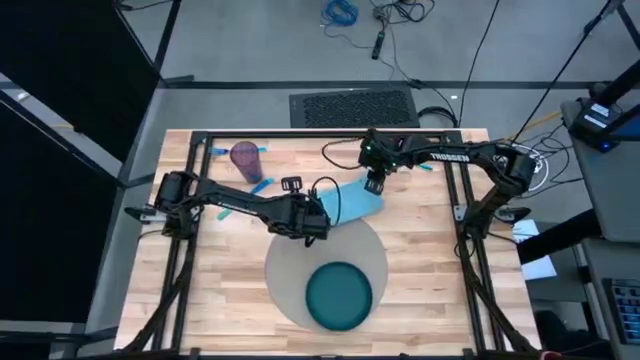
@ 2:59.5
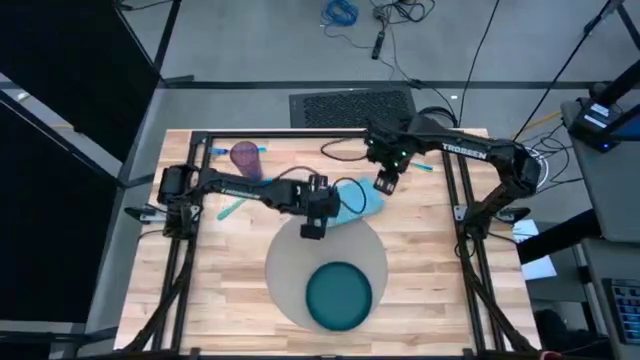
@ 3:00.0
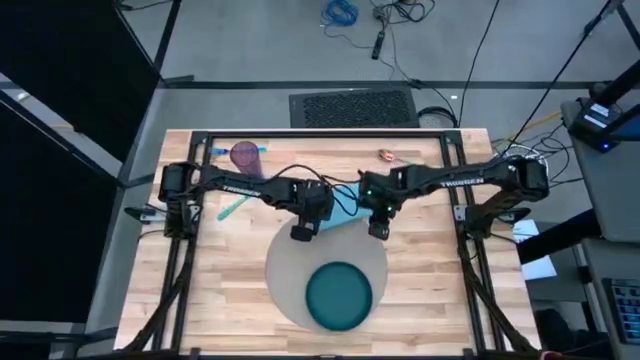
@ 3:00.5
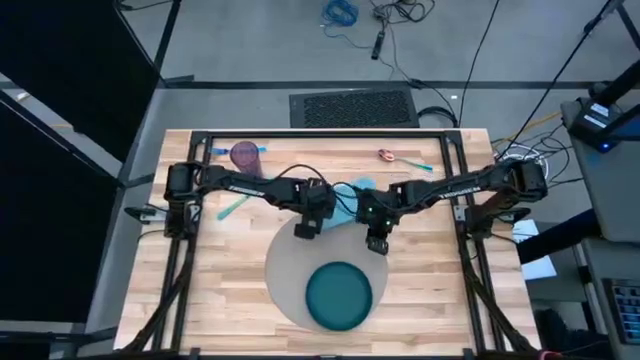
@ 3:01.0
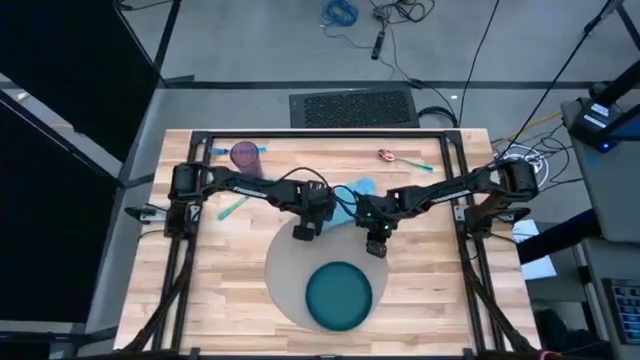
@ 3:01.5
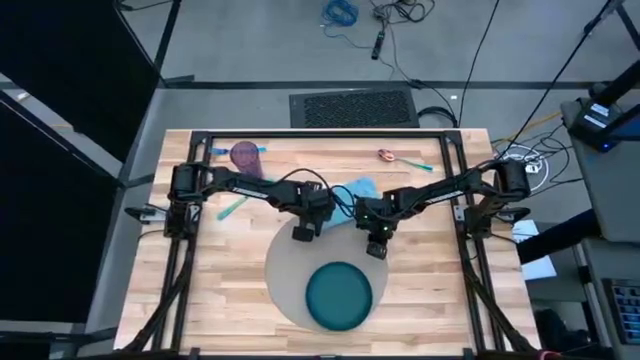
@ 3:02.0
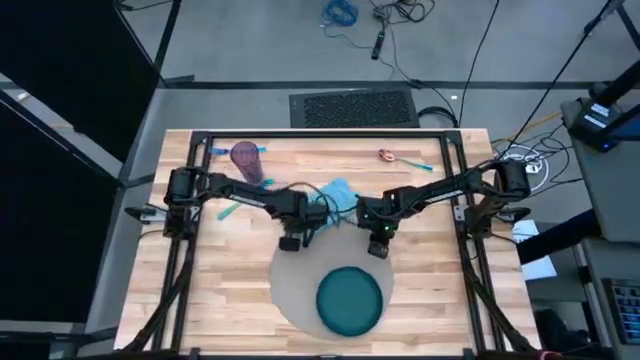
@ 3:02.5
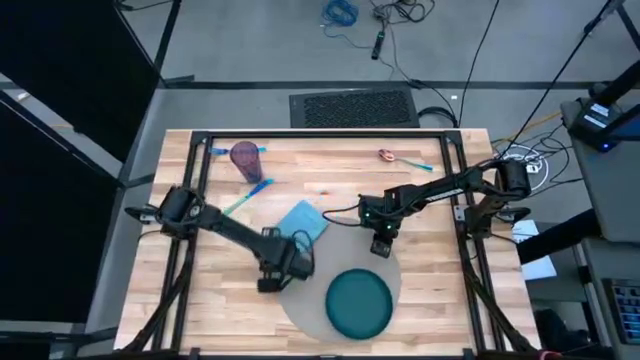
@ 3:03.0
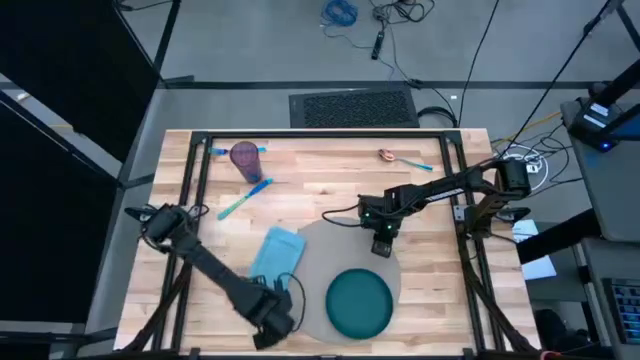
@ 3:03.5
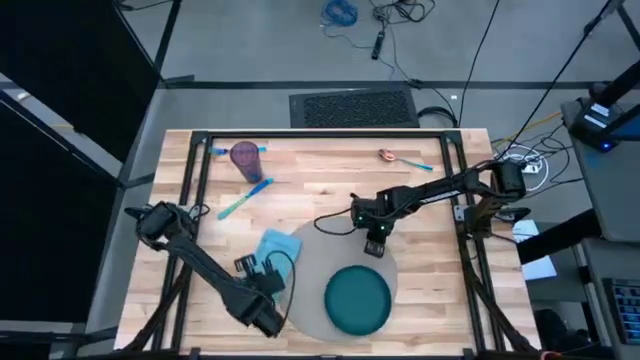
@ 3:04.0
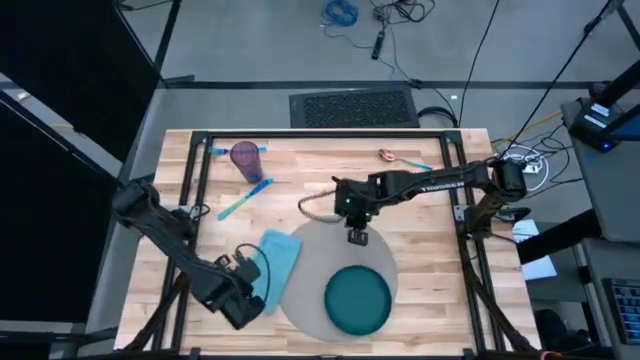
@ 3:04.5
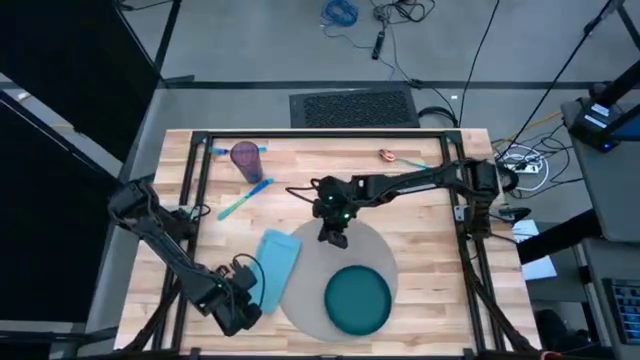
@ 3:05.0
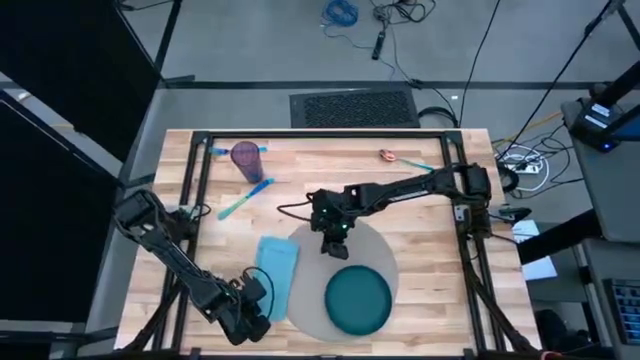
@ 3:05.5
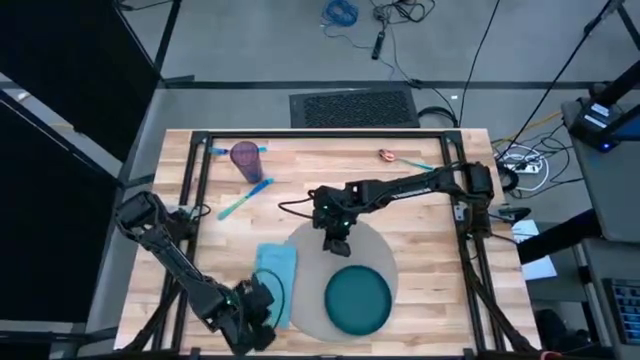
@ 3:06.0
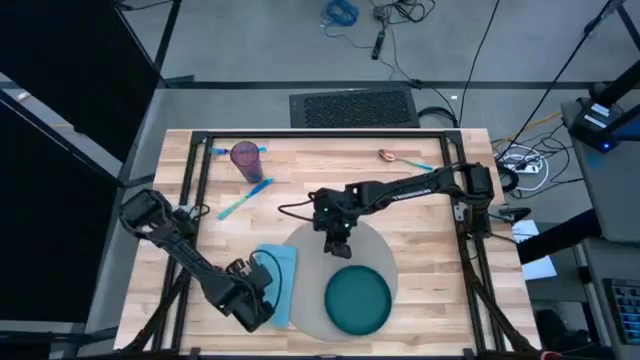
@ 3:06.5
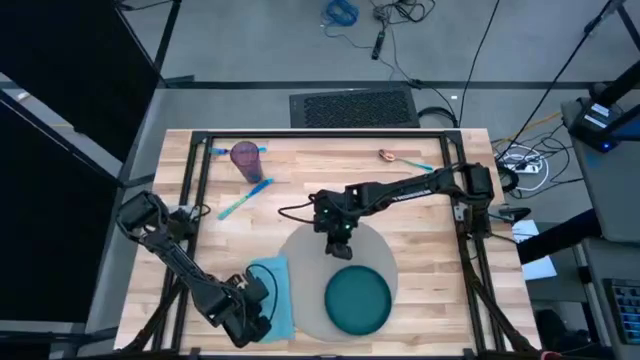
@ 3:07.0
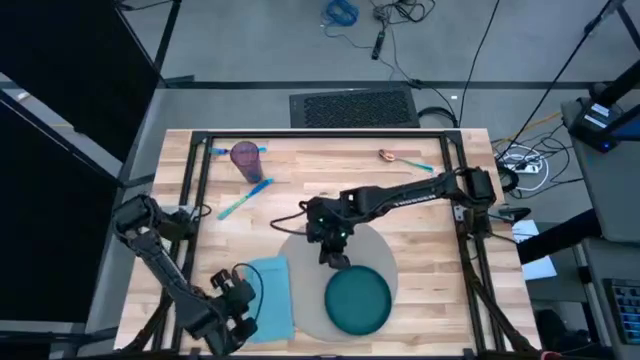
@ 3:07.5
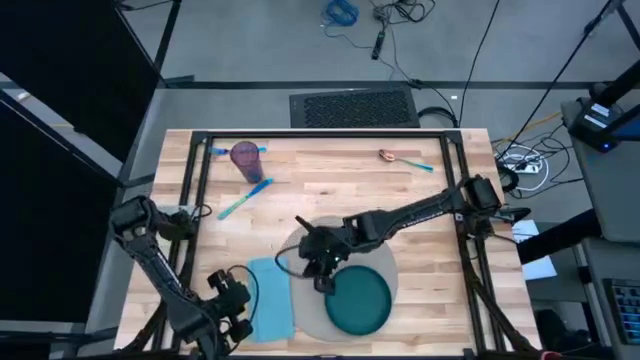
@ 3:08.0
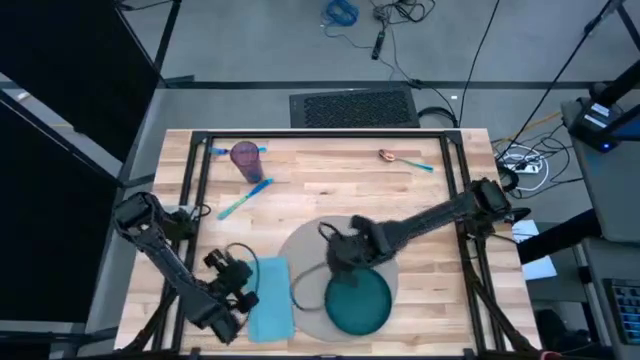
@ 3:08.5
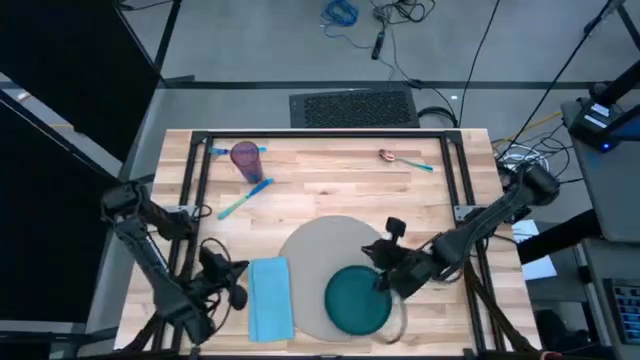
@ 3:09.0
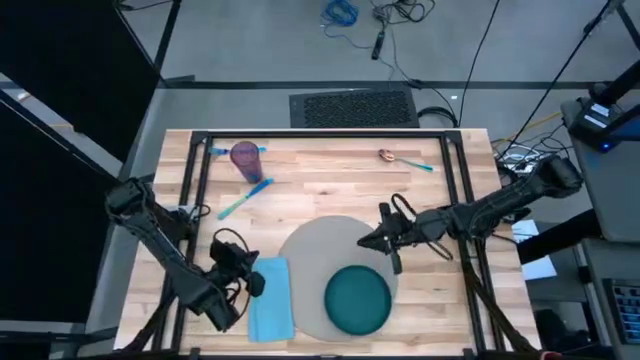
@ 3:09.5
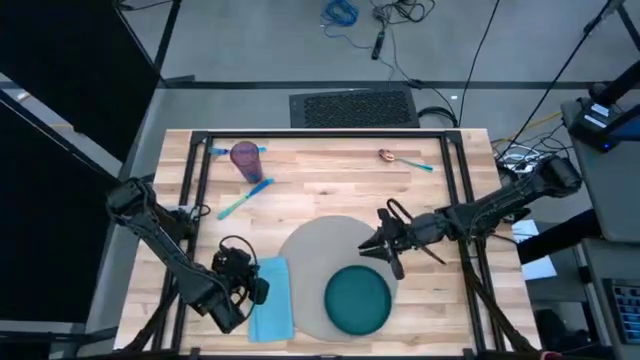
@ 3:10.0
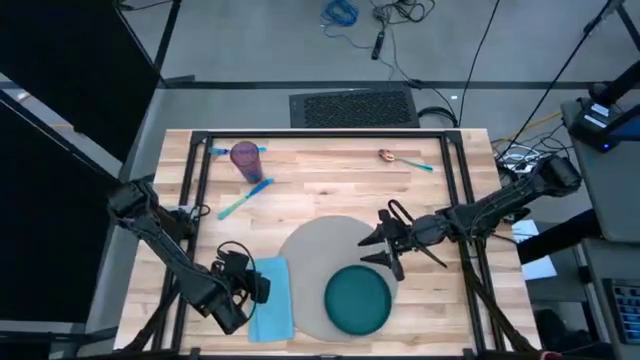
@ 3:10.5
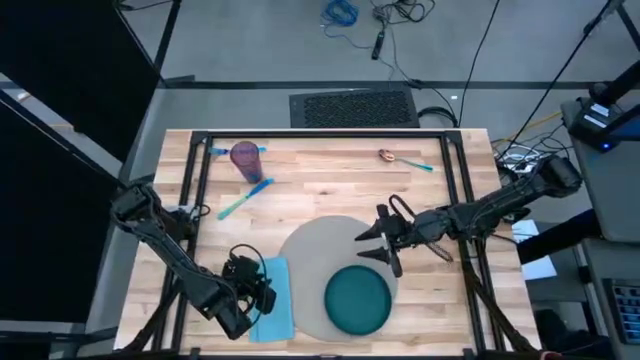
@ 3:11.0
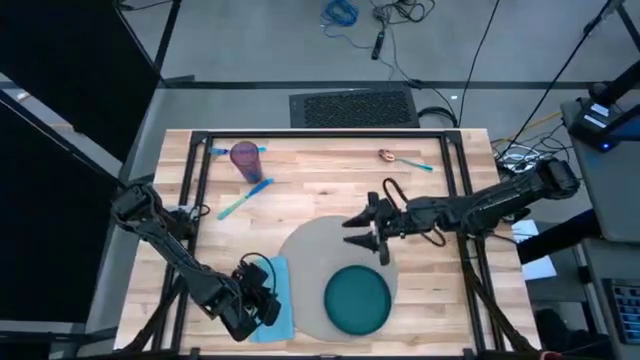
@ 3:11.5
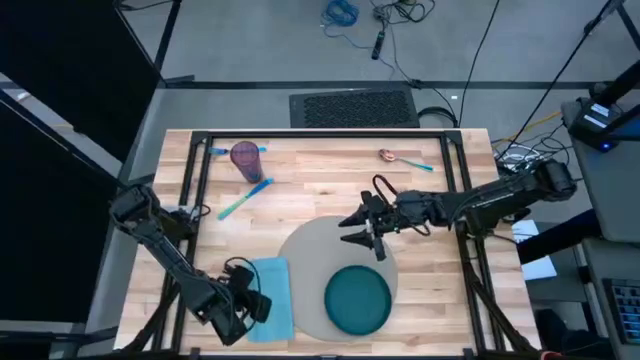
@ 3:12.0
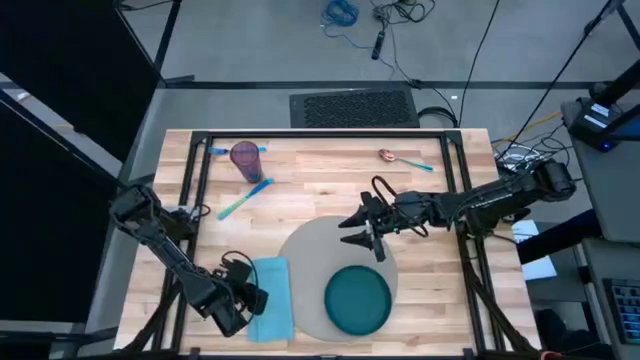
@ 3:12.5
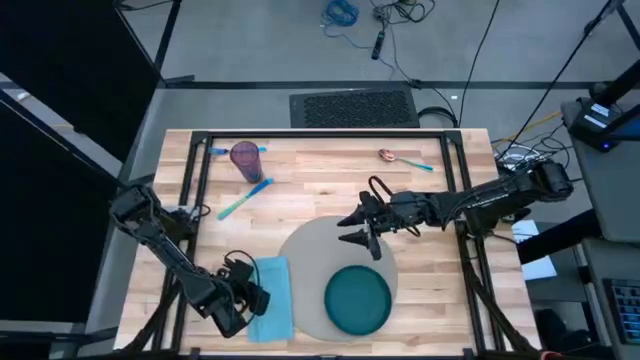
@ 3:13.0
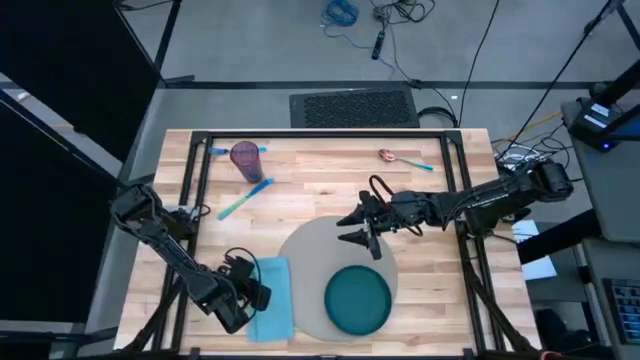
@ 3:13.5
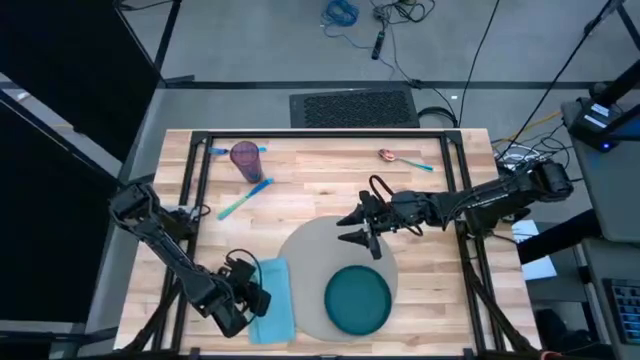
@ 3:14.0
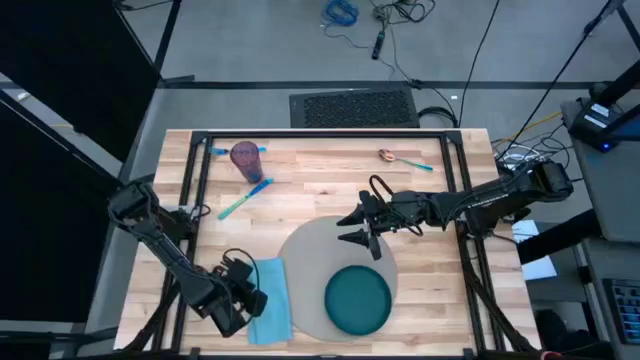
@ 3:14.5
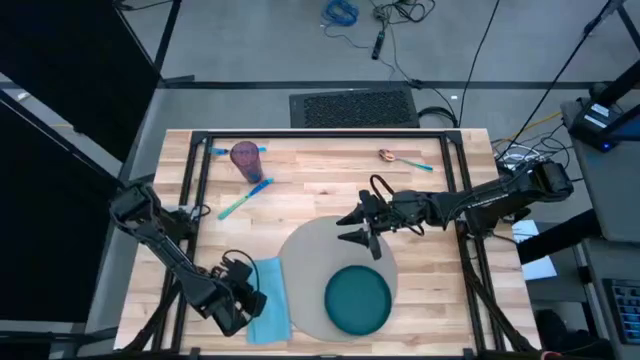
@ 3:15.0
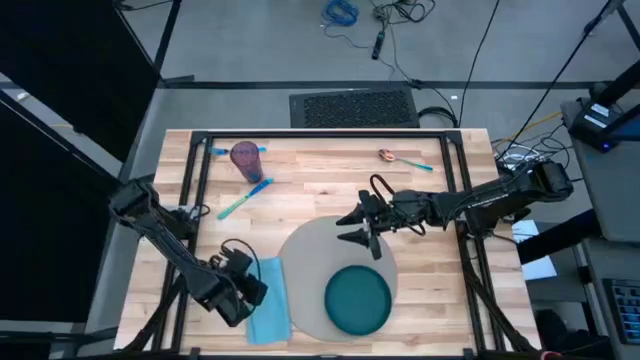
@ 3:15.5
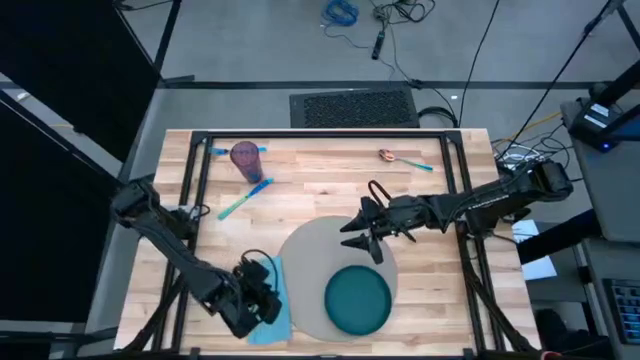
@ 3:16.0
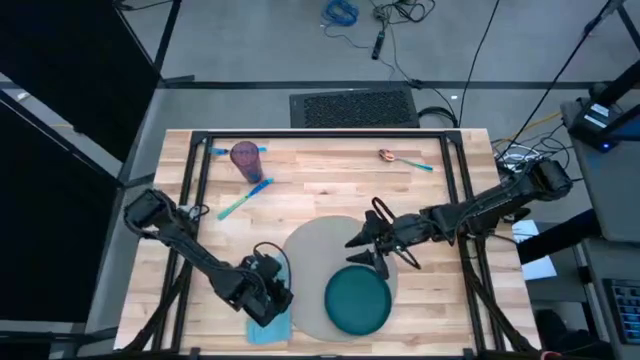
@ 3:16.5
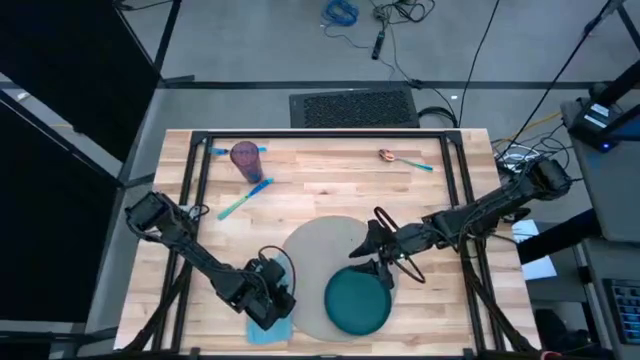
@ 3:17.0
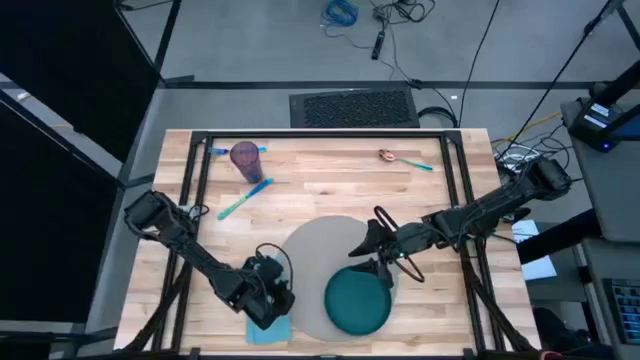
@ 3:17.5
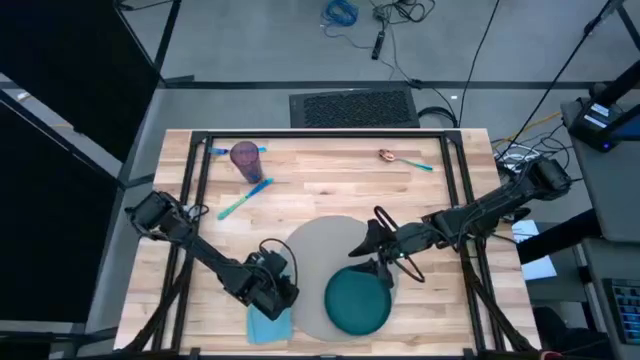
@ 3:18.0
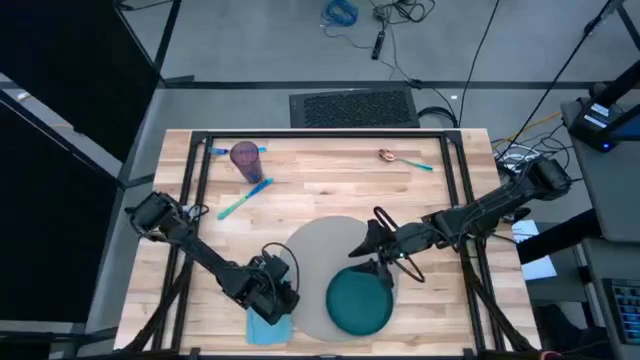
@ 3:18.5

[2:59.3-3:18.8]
Task: Set table place
Move the blue napkin to the bottom left of the table
